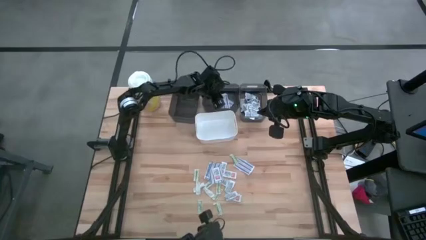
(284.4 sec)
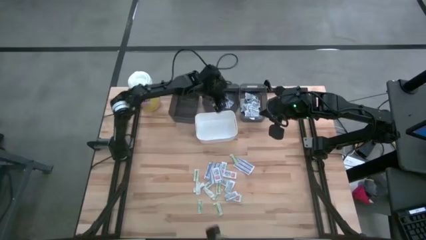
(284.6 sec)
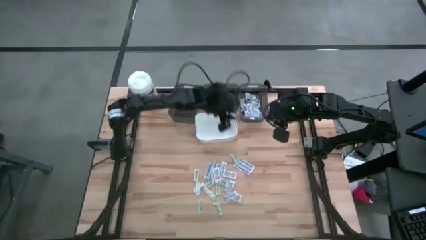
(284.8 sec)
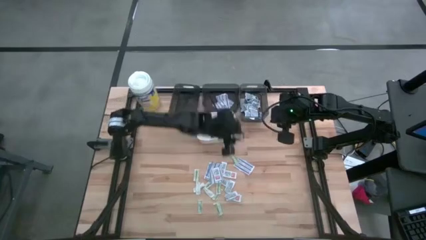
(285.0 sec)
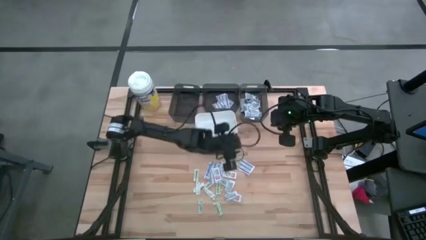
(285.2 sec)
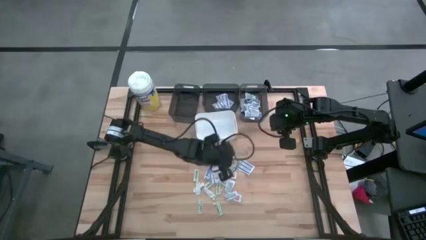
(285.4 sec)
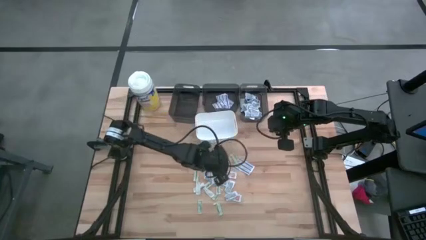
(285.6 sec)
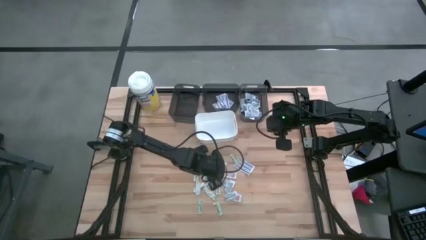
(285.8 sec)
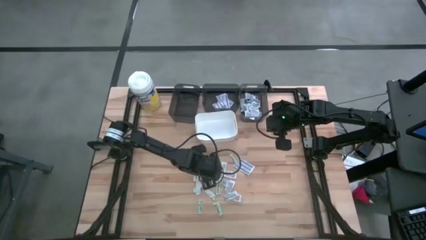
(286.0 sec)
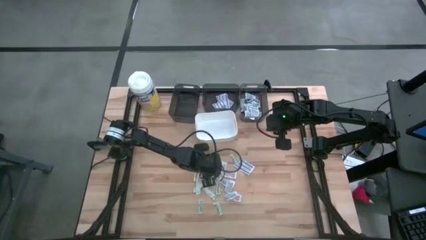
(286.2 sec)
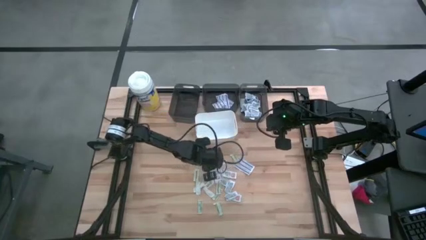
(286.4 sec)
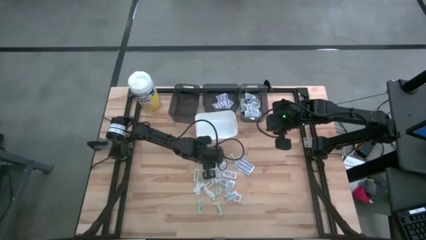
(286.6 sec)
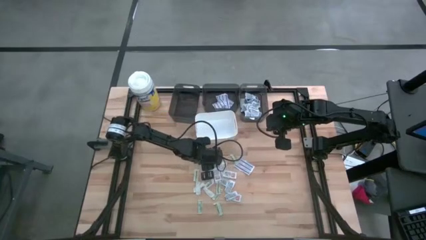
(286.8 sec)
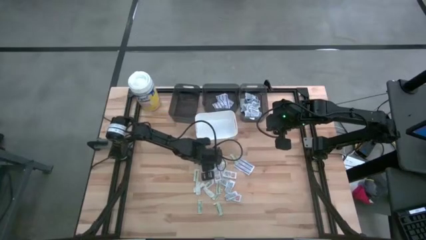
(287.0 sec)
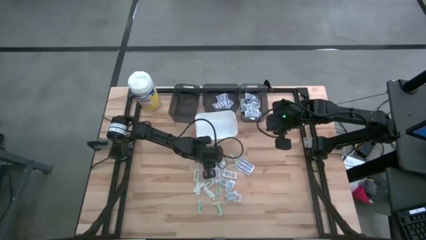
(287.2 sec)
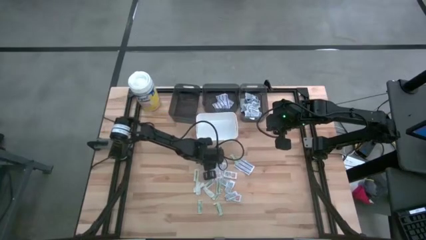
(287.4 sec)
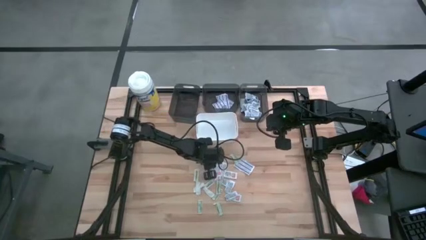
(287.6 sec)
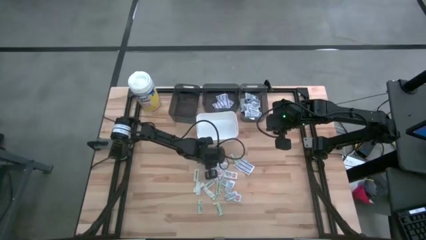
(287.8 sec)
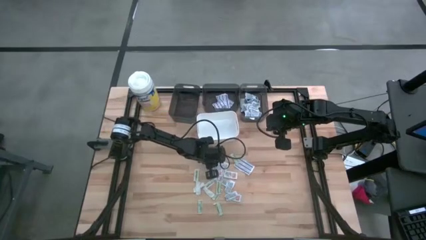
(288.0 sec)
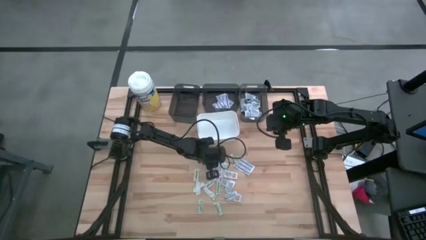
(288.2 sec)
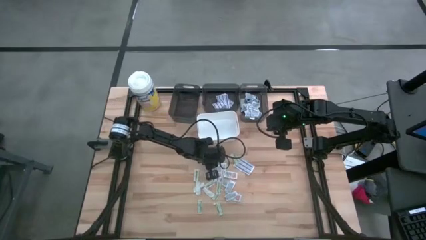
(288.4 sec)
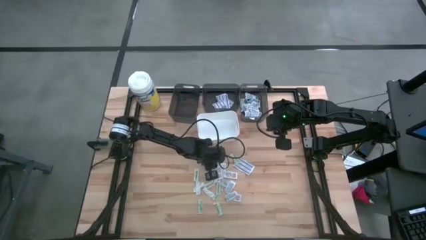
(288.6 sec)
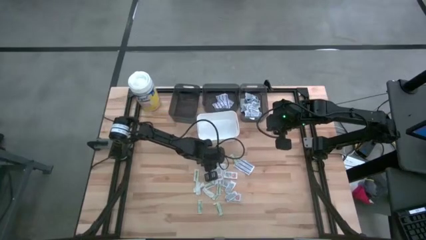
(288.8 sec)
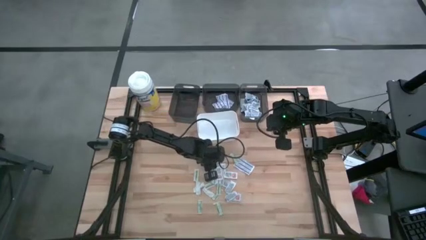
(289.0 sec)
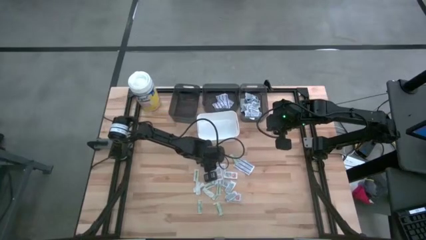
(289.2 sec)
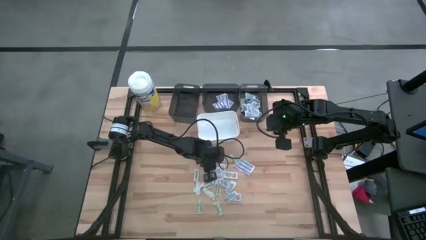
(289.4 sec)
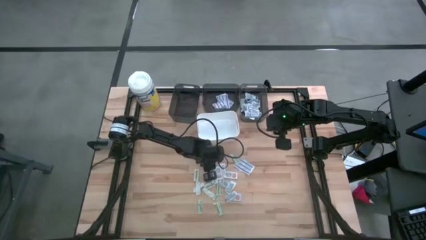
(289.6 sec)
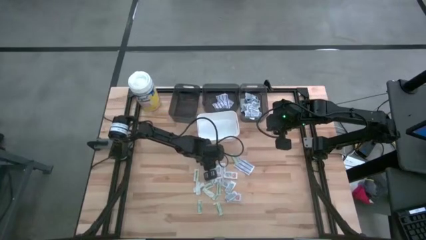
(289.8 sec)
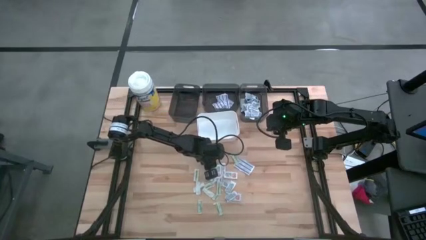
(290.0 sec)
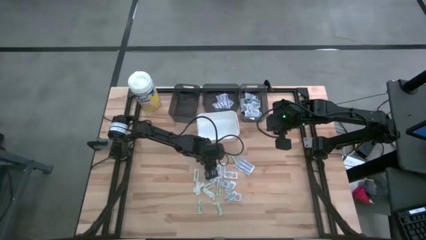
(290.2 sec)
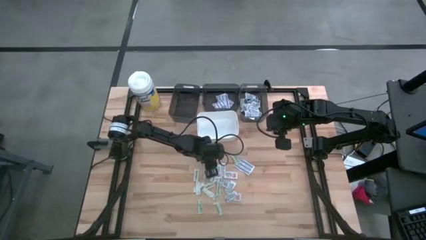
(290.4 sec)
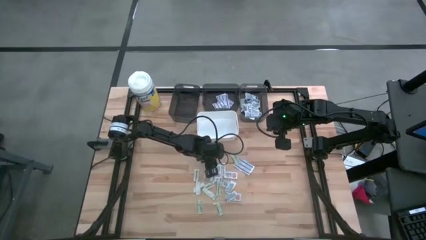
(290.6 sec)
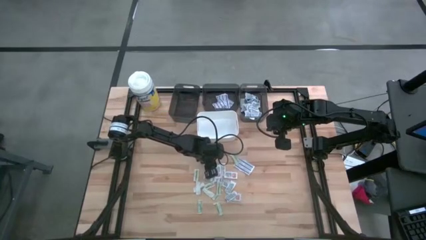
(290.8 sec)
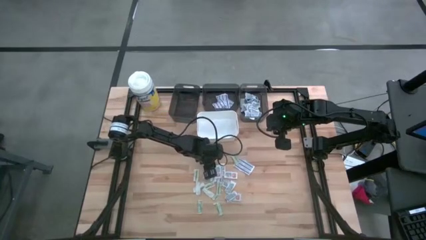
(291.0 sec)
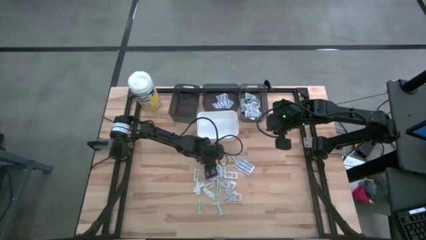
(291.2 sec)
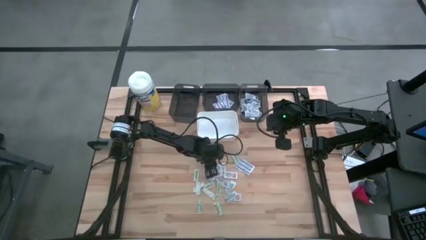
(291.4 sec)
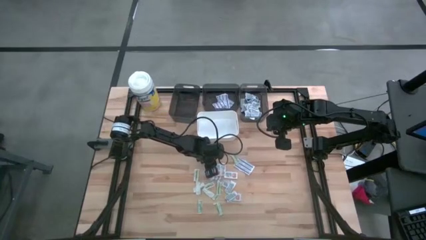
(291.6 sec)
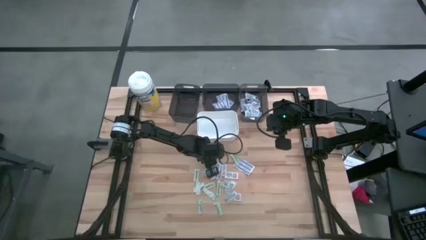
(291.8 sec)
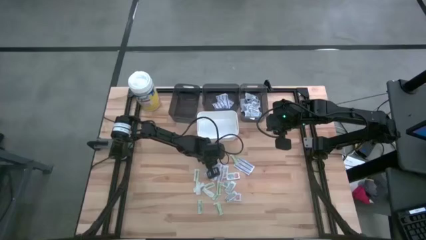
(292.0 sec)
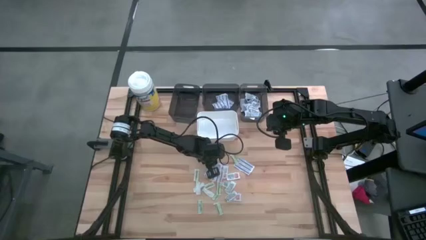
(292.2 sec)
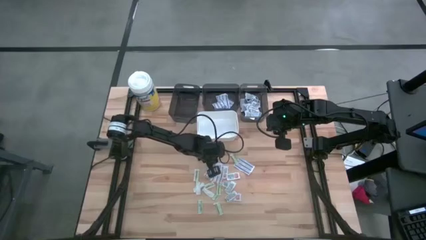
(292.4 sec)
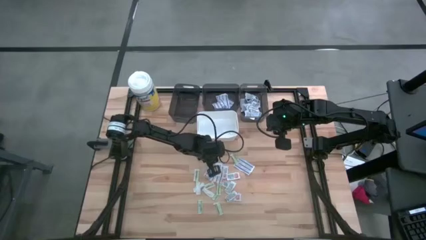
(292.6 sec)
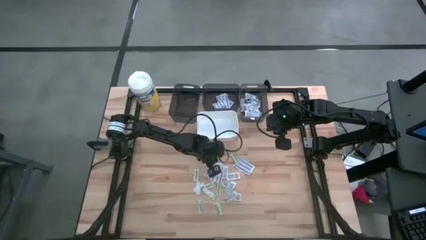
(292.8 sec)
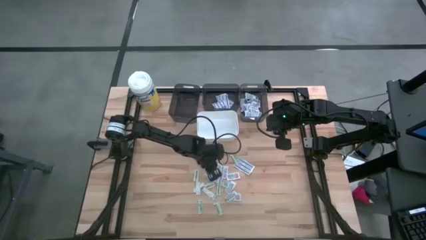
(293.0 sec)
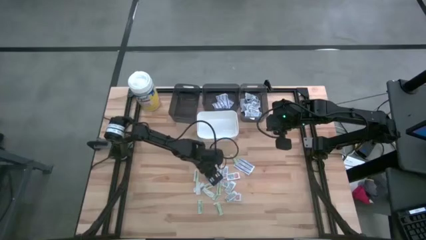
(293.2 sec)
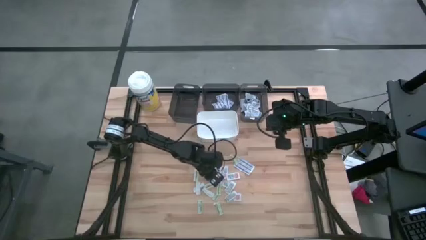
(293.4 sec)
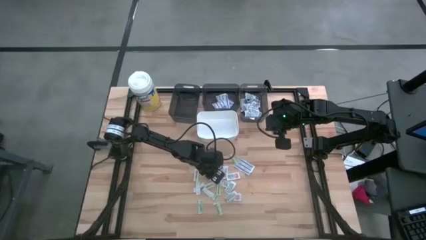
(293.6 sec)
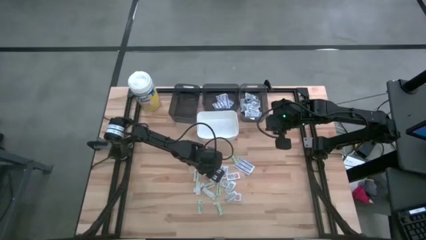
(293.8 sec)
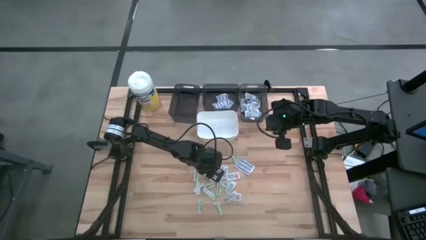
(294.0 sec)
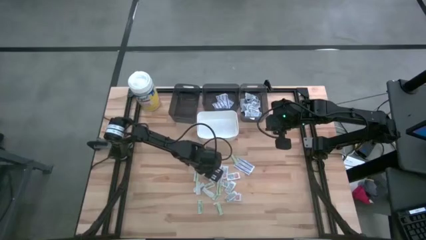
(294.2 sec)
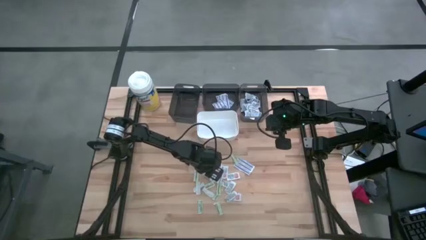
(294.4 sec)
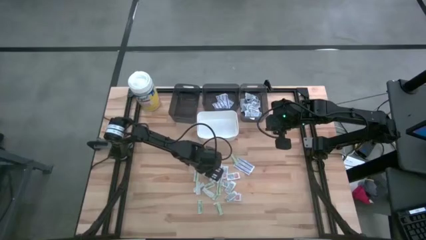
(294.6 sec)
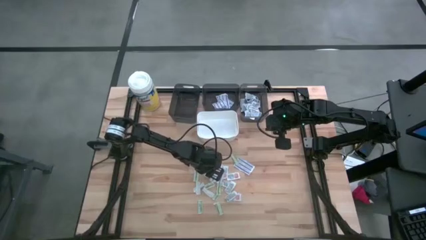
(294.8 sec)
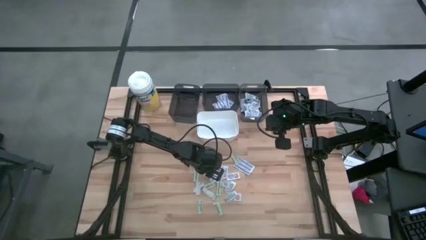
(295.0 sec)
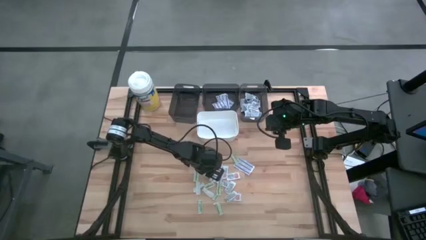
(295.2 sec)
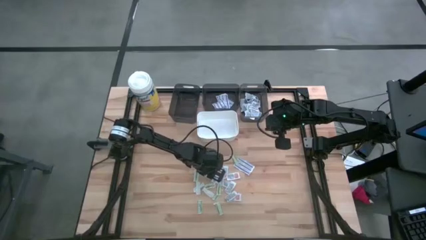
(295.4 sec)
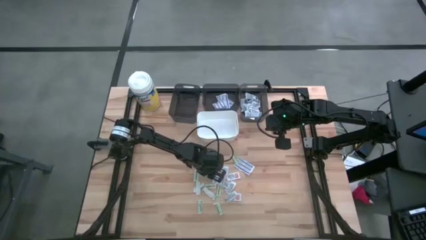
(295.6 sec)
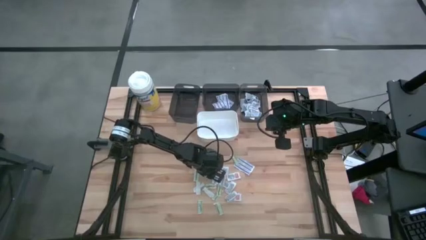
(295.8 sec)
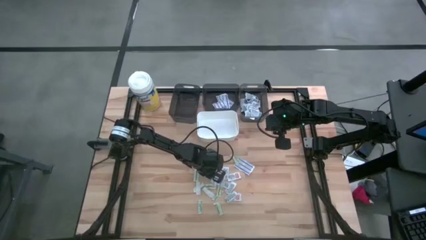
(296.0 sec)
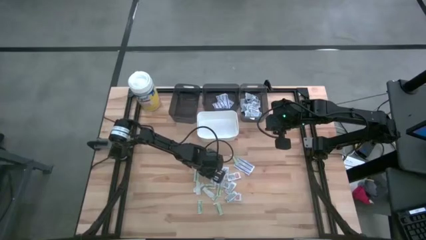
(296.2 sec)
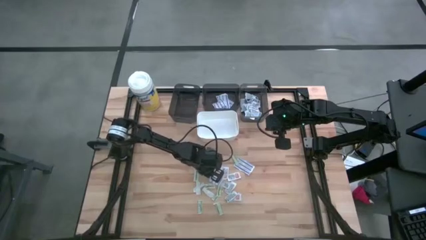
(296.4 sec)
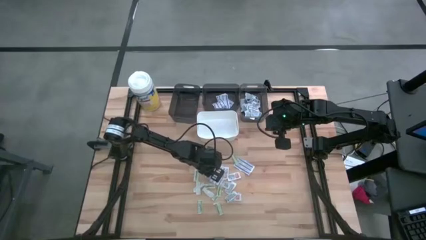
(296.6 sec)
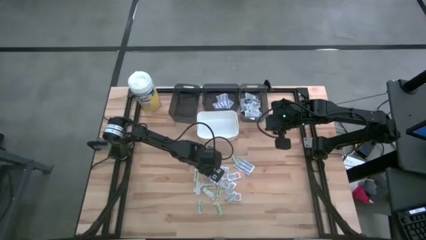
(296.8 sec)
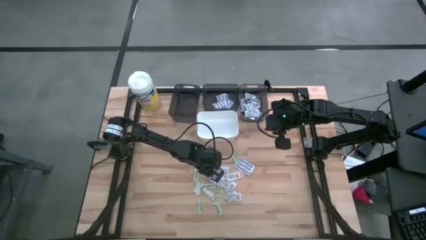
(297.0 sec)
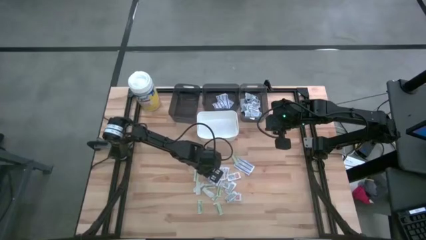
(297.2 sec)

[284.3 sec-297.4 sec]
Task: Pick & Place First Aid Supplies
Put the blue bandage pack into the middle black bin

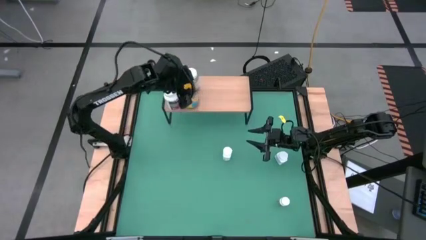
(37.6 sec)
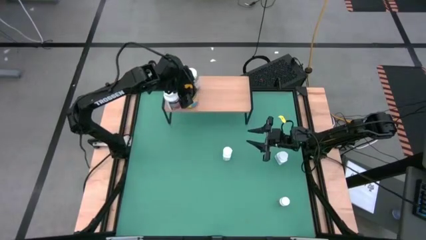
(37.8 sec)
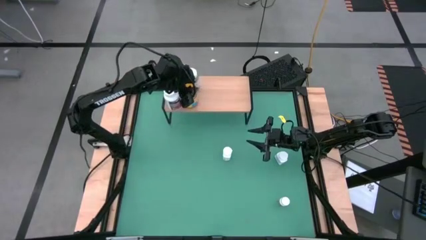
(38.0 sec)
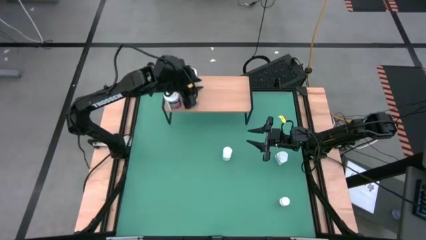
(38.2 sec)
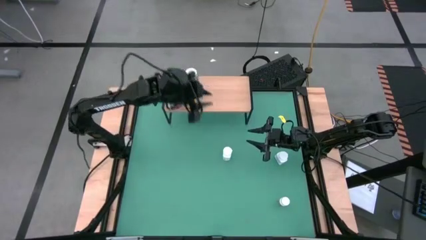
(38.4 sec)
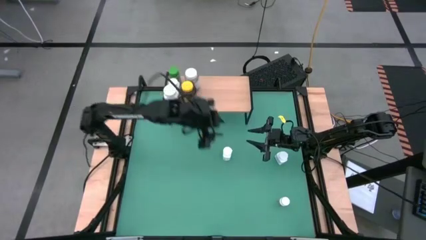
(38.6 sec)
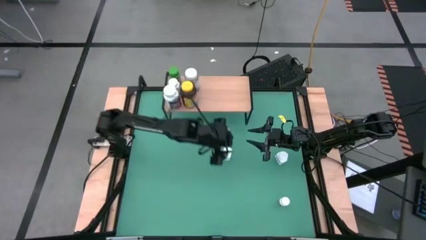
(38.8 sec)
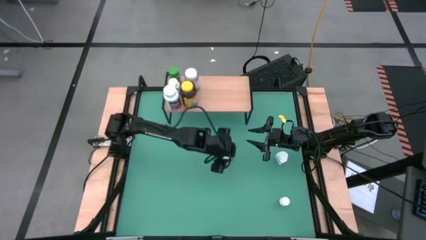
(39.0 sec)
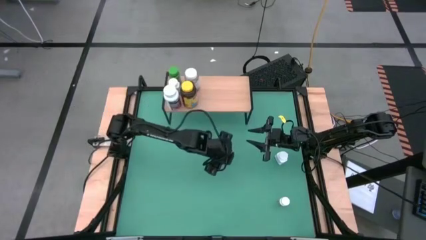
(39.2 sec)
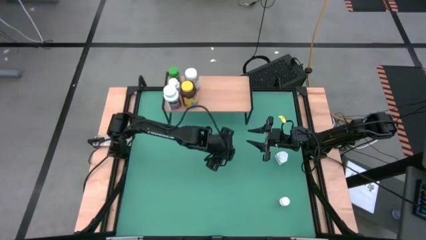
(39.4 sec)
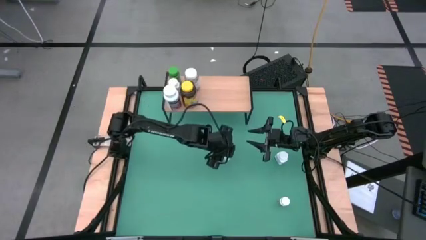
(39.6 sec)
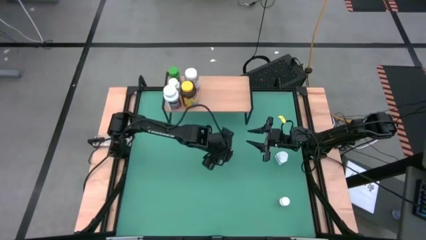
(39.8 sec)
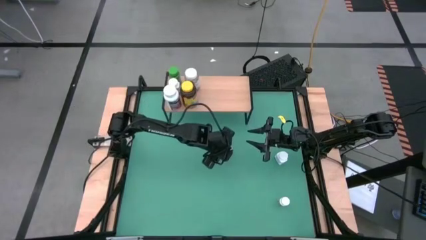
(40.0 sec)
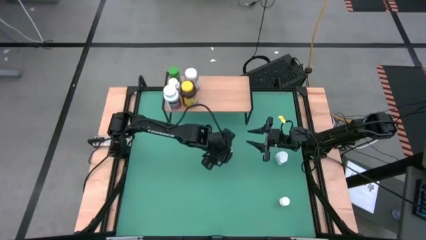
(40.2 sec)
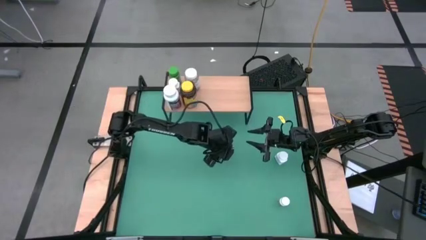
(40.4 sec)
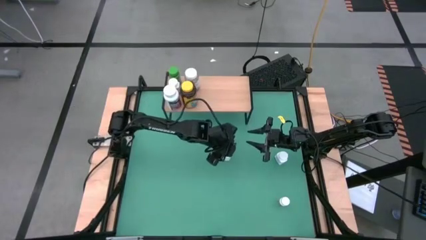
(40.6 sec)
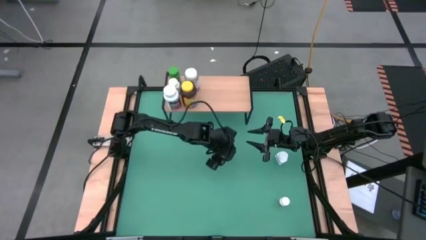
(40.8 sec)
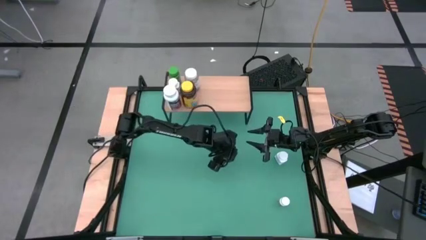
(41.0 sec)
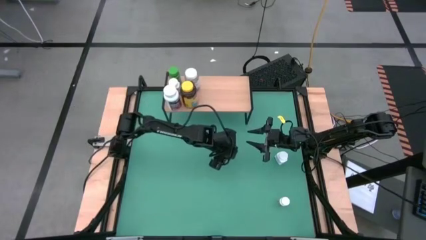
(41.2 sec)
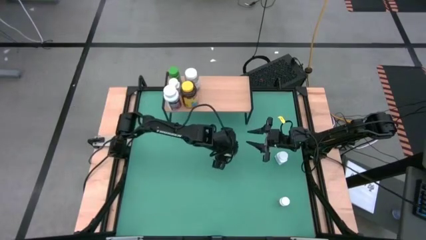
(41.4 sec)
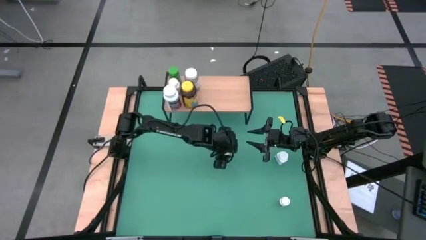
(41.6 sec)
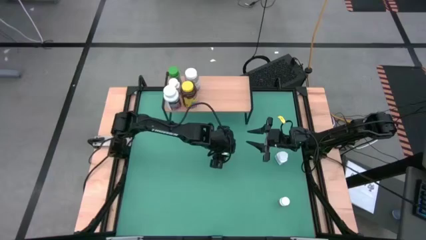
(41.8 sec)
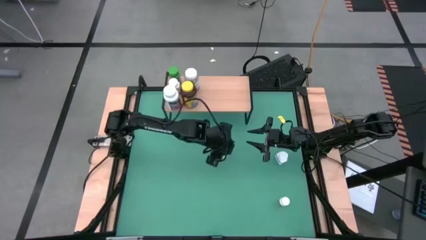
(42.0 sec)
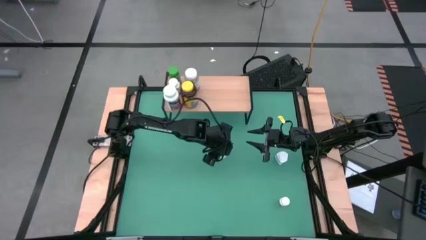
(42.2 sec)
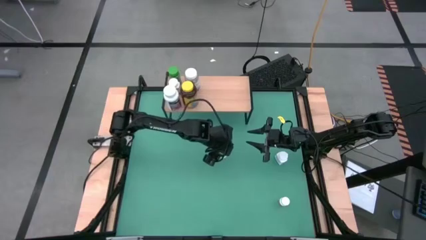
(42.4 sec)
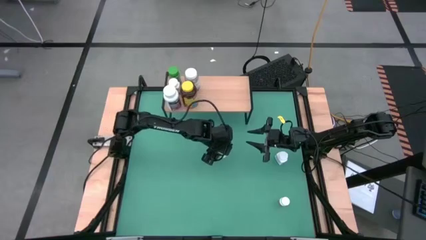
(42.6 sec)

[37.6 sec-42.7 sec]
Task: Pick and place medicine bottles onto shelf by color
Put the left white supplement bottle on the shelf
